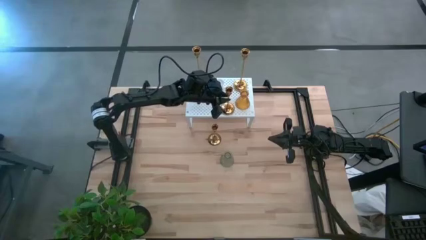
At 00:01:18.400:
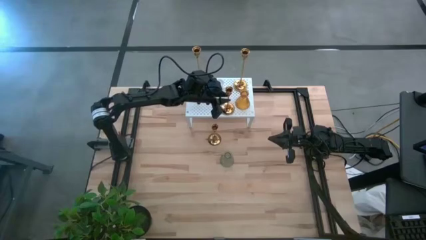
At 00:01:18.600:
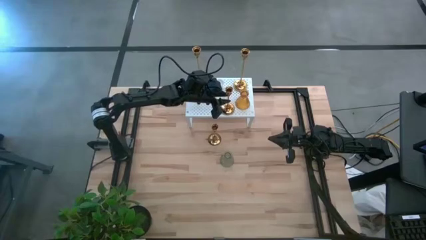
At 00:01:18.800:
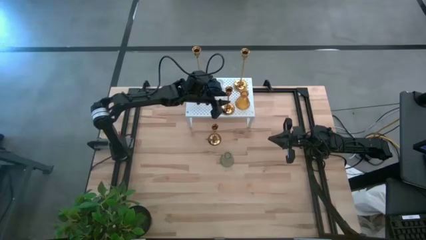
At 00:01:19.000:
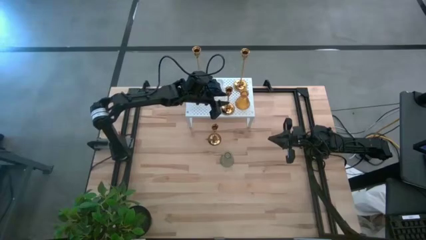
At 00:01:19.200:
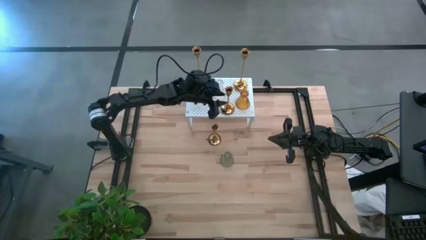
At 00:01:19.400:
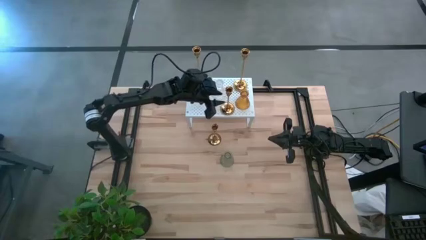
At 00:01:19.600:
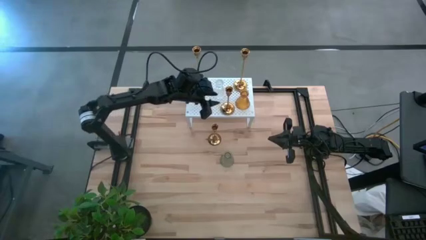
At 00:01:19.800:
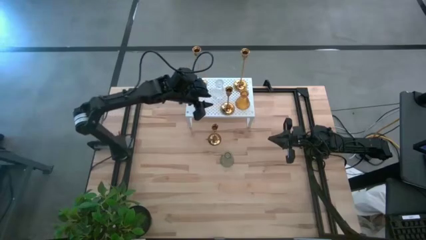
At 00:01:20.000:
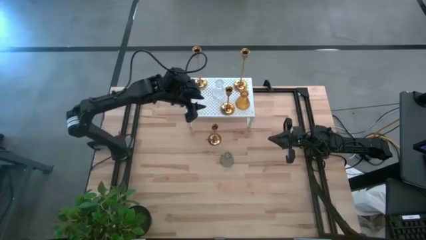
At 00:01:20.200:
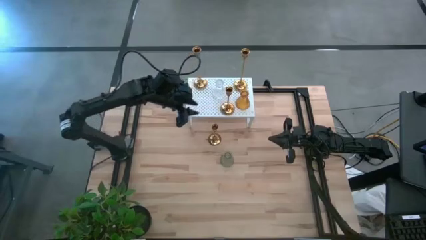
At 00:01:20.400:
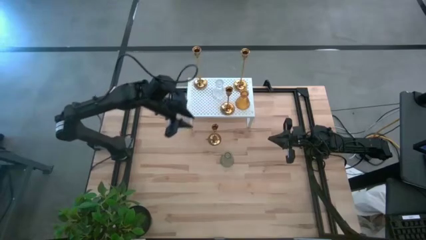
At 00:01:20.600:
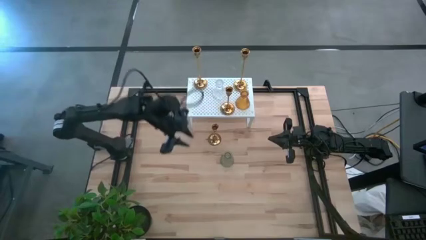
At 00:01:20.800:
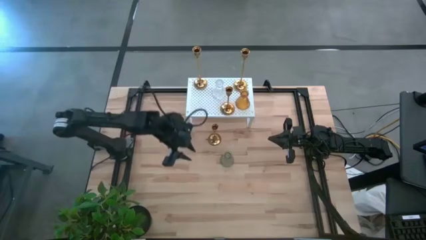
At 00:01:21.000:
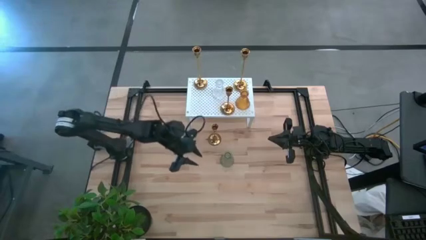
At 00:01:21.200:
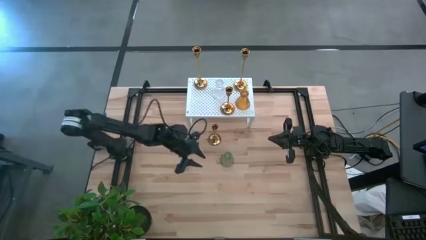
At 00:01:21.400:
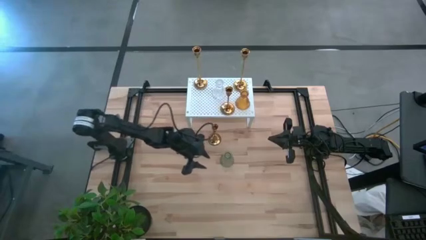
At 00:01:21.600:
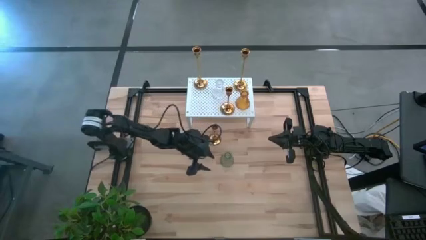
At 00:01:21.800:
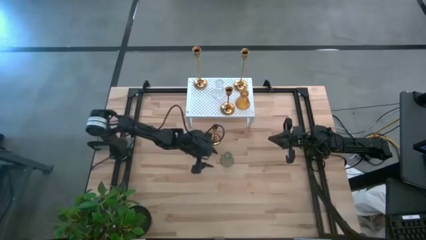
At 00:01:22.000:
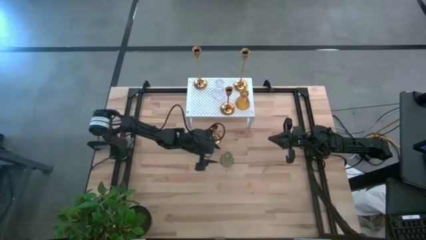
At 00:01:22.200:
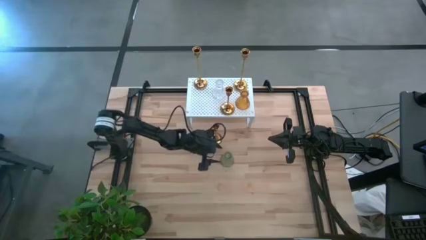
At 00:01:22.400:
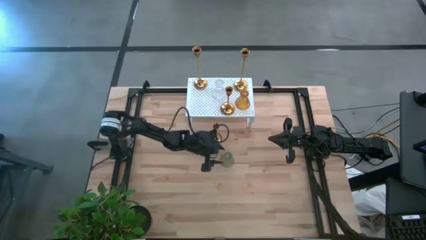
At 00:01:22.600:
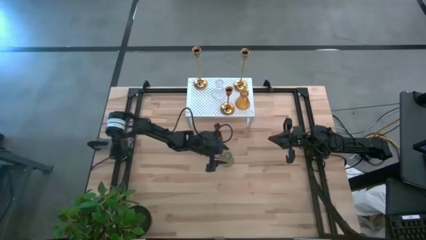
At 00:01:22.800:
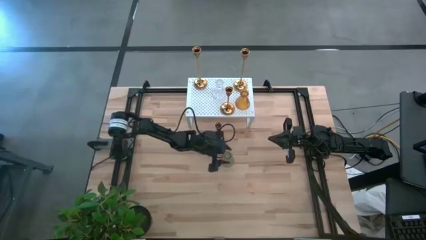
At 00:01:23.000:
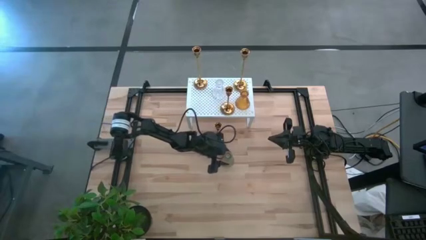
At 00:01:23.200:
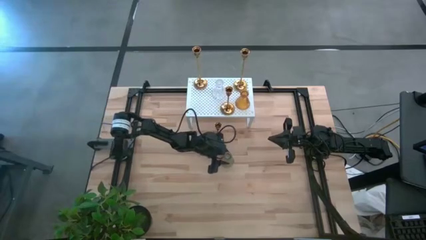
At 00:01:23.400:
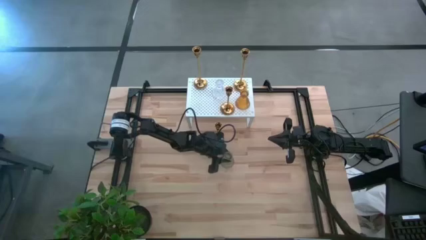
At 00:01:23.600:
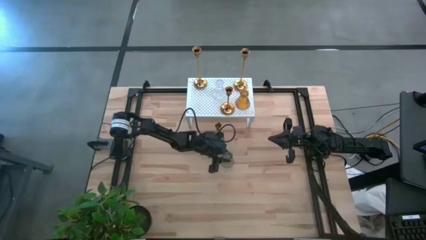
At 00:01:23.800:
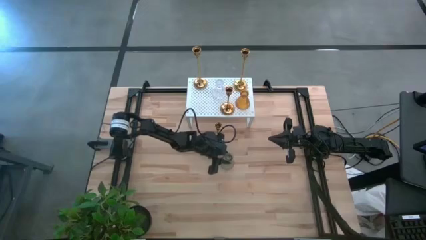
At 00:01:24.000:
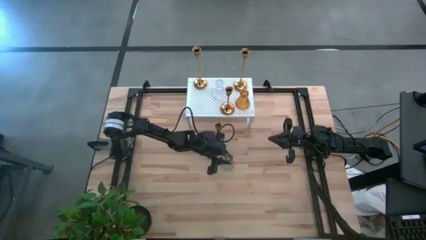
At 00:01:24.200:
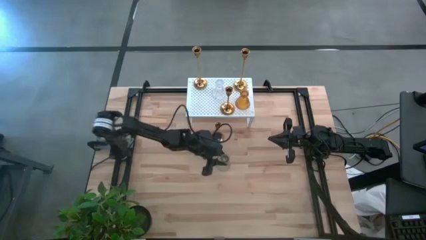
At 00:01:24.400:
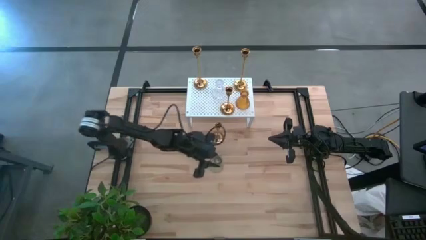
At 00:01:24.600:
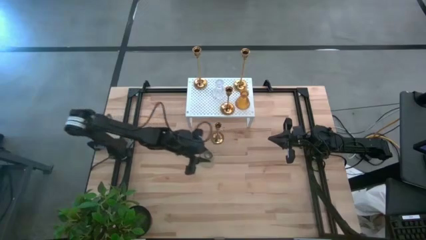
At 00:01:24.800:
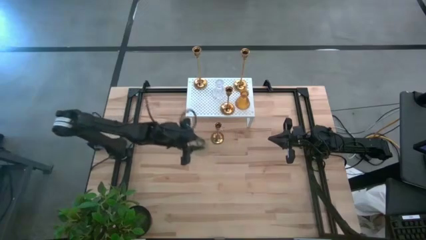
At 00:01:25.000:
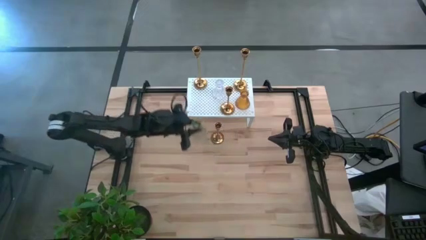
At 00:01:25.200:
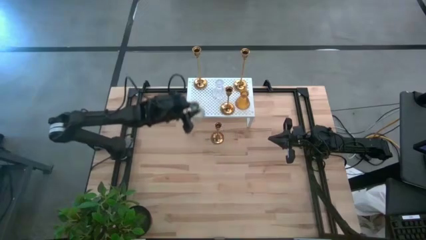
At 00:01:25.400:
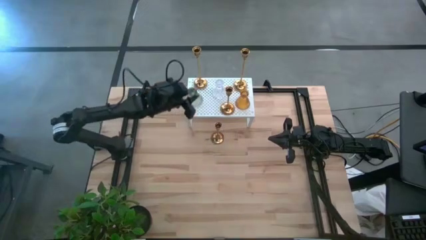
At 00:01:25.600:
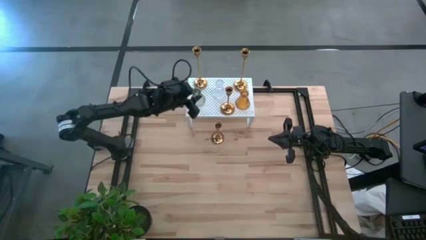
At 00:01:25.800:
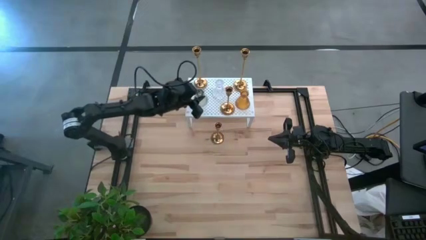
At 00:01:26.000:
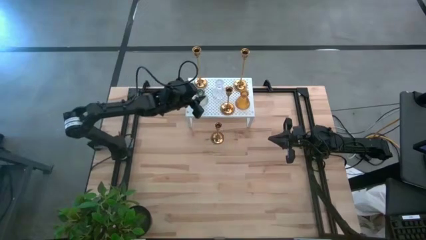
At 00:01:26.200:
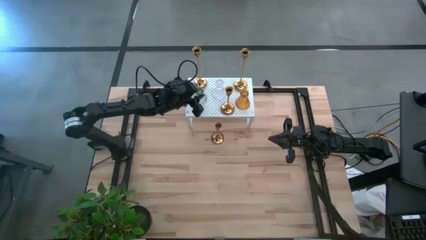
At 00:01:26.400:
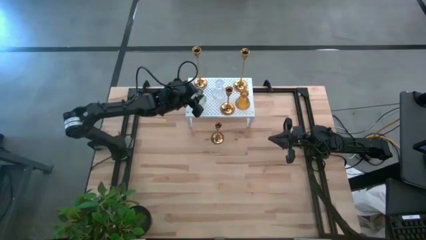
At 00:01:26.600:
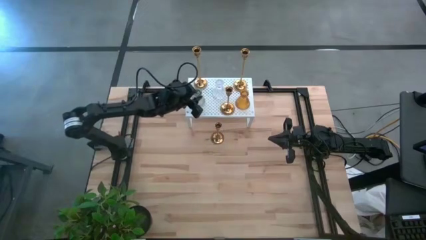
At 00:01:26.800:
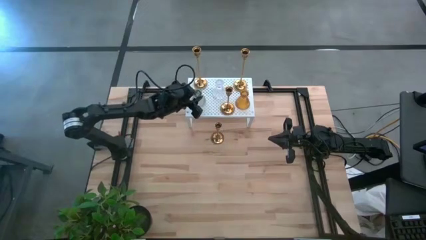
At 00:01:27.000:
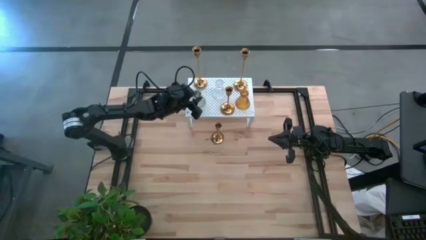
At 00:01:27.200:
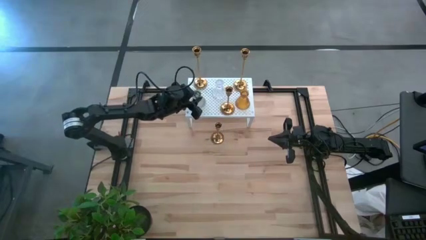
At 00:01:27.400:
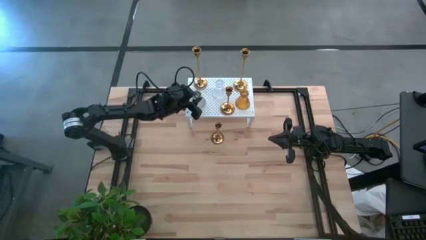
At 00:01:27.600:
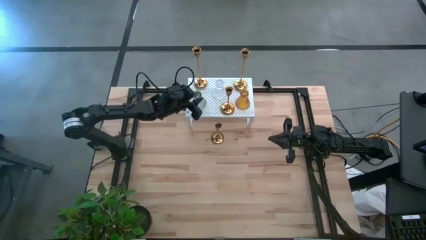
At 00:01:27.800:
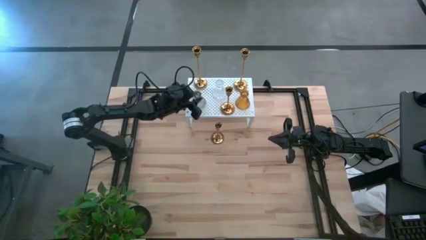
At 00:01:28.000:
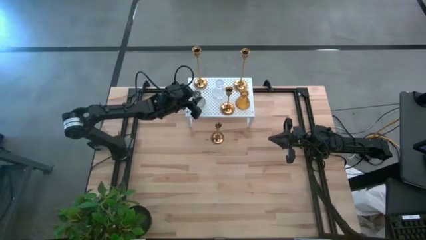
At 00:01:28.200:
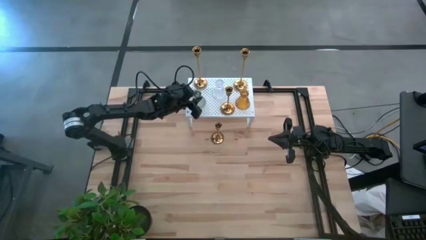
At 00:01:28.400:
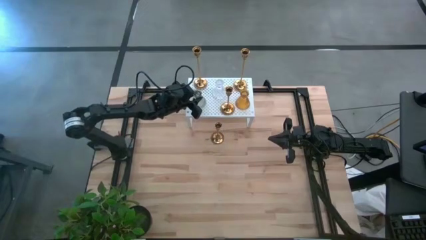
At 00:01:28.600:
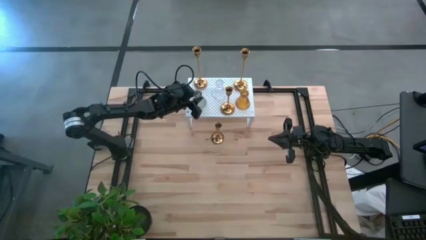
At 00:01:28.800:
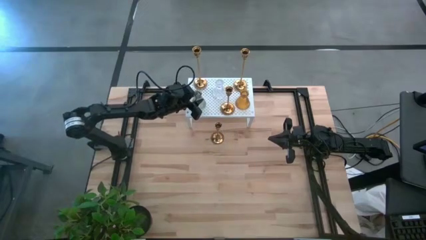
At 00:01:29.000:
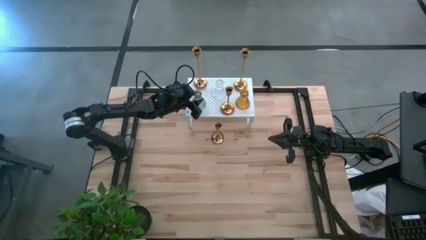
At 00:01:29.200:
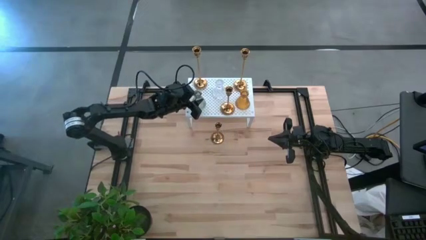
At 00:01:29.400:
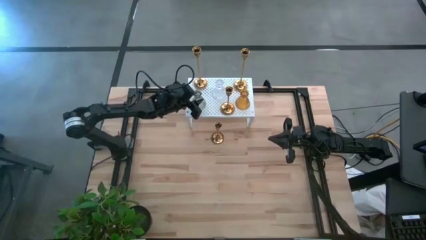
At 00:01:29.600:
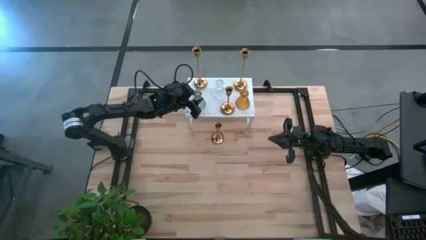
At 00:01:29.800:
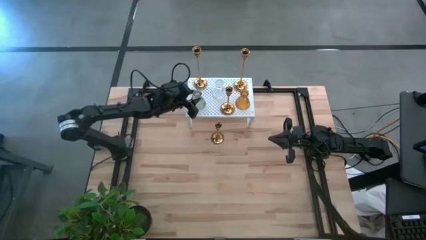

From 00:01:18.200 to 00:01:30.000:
Task: Pick & Place candle stick holders
Put the green glass candle holder on the shelf

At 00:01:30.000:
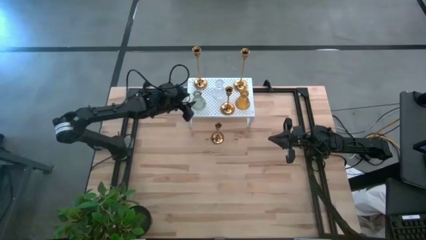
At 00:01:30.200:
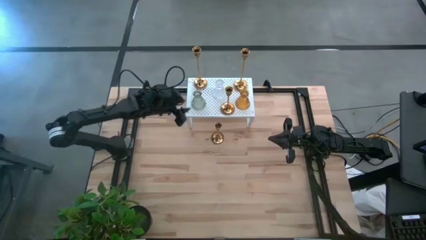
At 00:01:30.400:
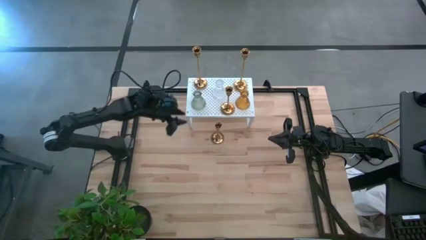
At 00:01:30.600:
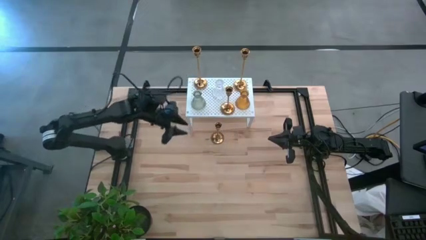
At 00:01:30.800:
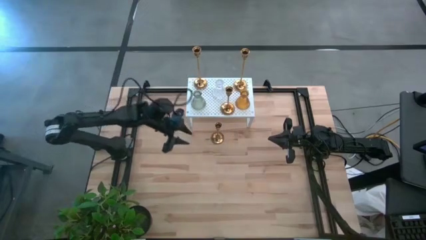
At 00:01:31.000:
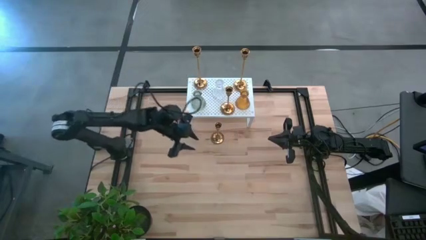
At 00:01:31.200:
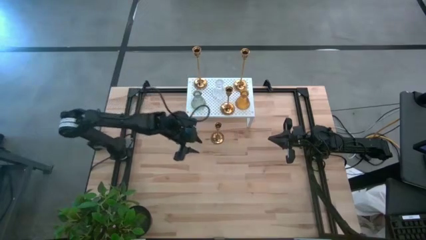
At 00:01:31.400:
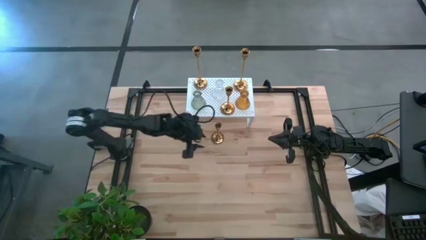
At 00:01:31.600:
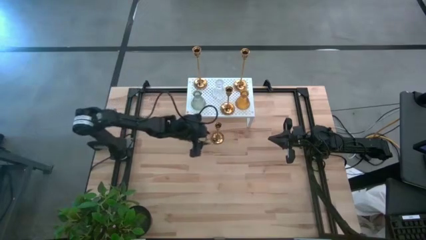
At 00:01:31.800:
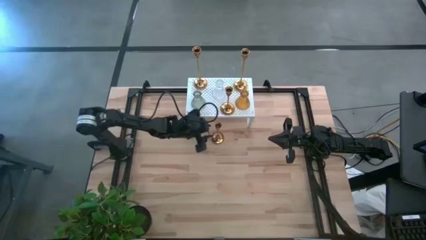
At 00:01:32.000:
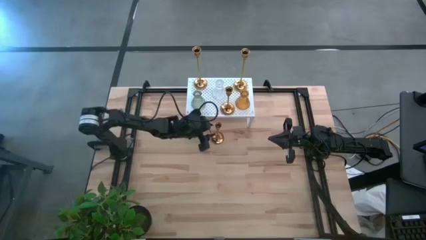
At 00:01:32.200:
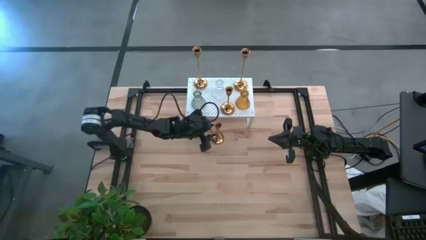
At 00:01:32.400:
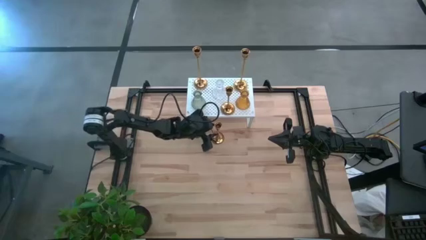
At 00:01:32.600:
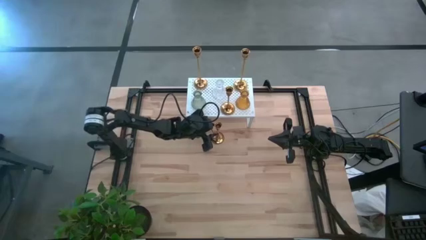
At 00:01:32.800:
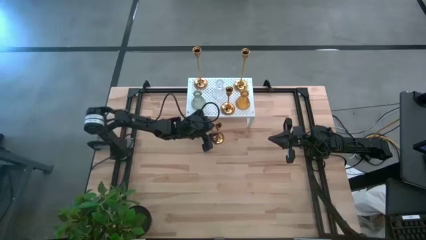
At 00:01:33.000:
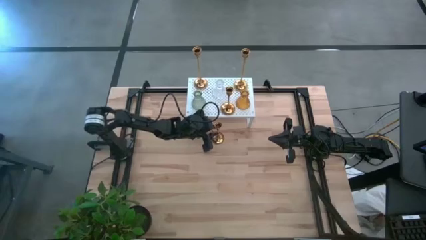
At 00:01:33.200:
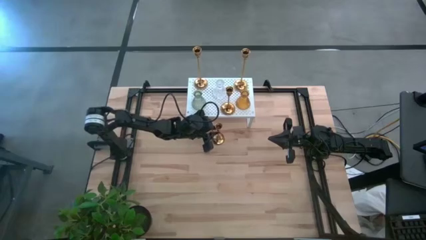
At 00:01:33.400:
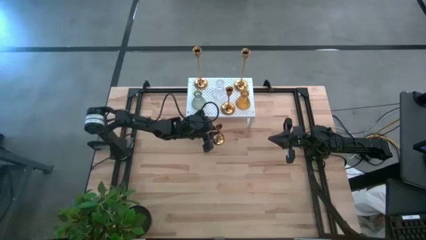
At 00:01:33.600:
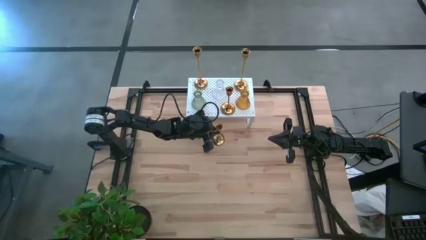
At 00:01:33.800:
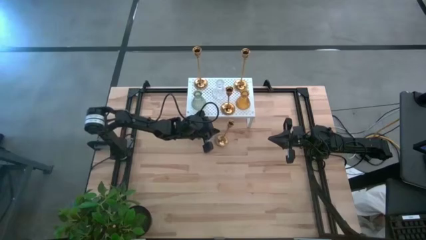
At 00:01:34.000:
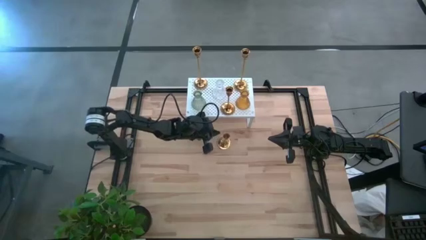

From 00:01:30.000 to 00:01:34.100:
Put the small gold candlestick on the shelf
